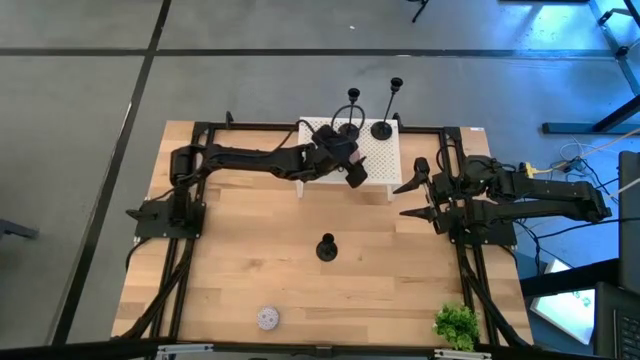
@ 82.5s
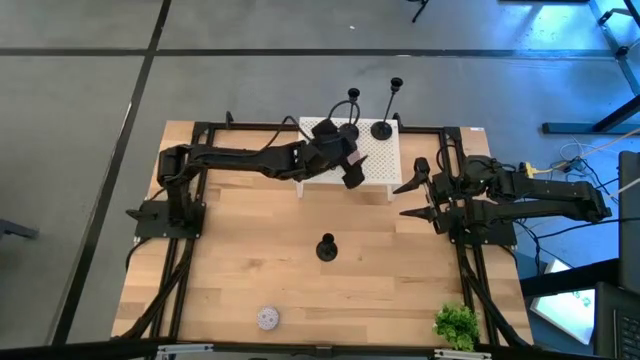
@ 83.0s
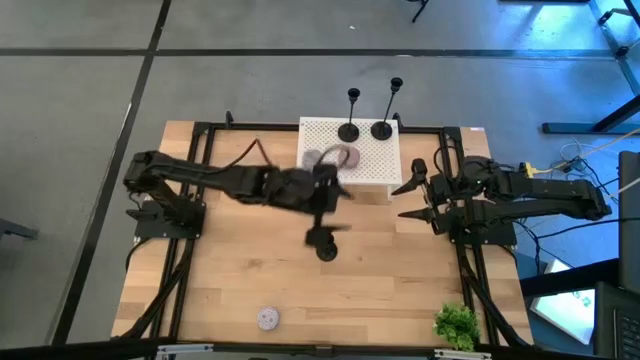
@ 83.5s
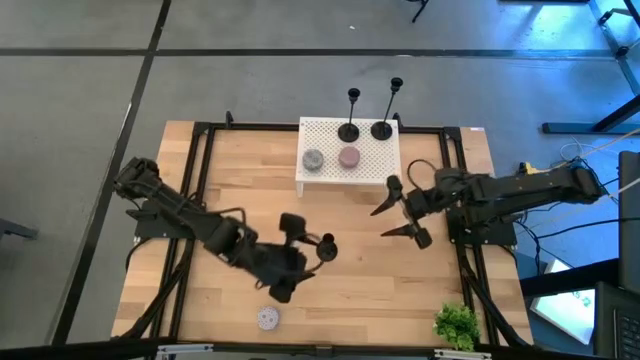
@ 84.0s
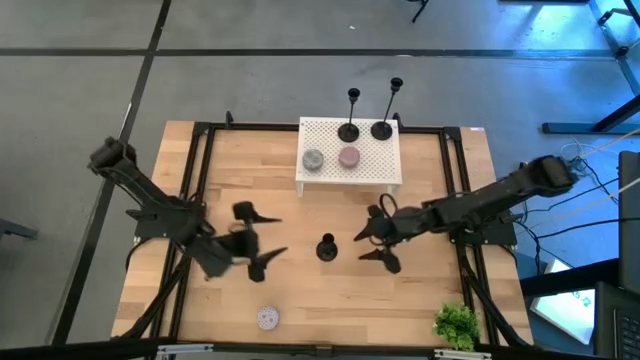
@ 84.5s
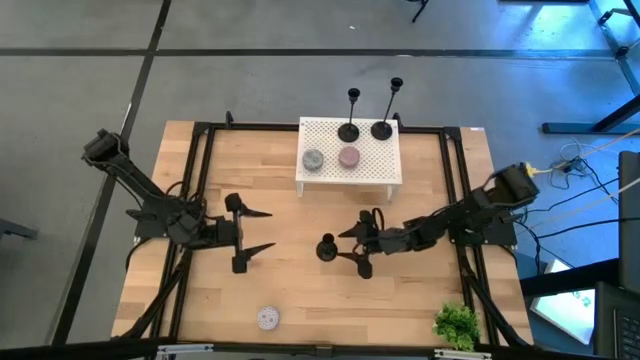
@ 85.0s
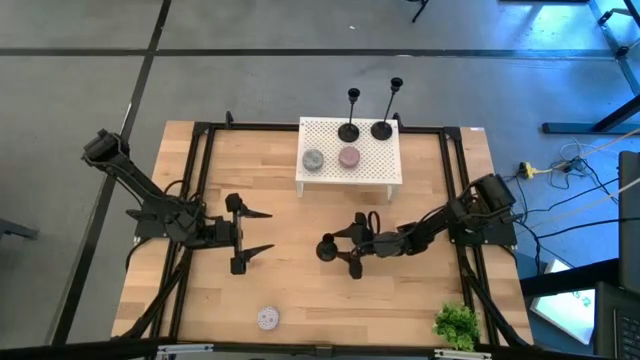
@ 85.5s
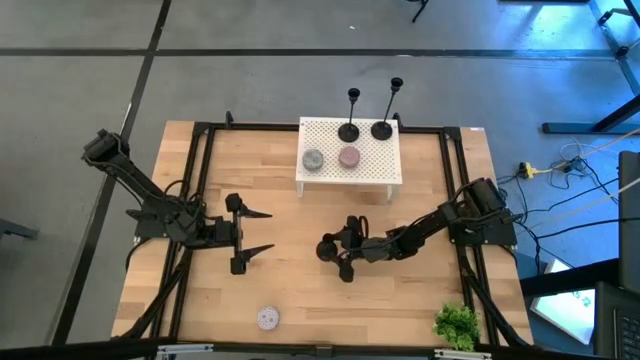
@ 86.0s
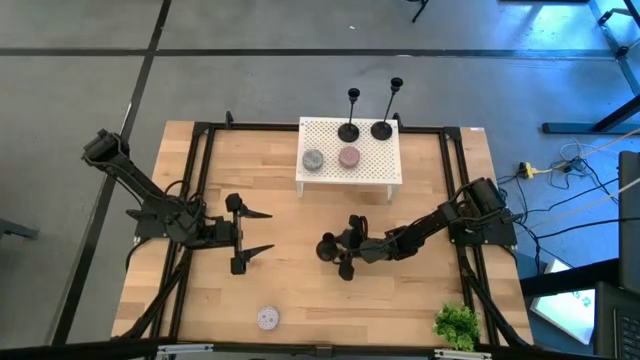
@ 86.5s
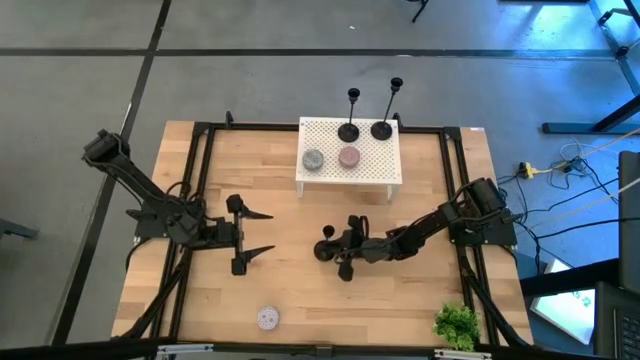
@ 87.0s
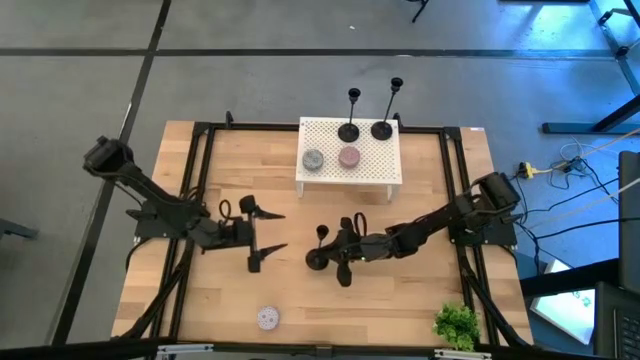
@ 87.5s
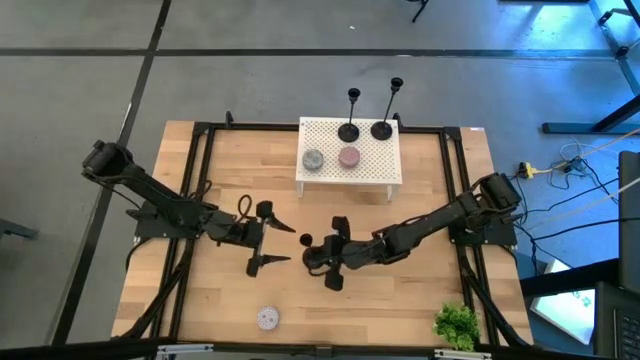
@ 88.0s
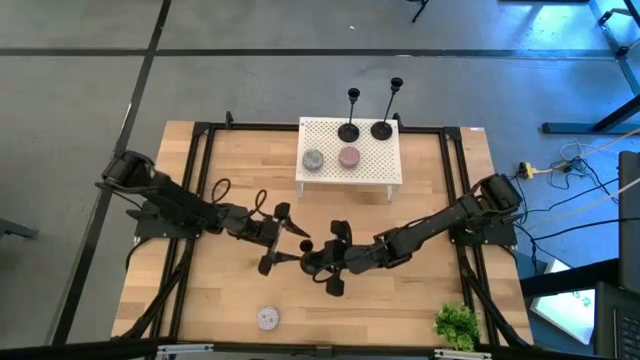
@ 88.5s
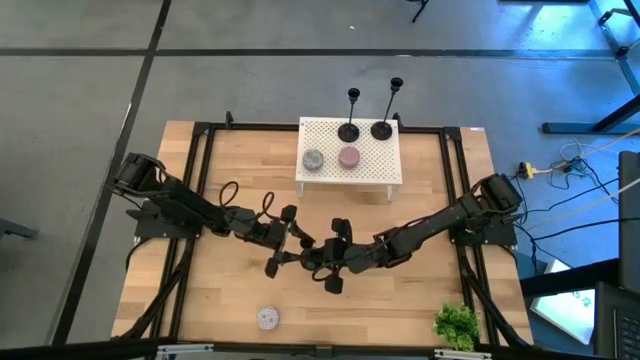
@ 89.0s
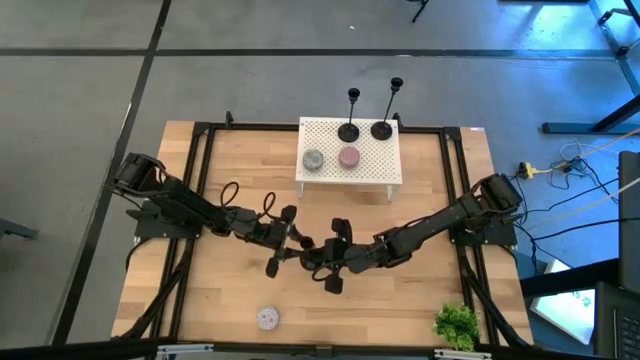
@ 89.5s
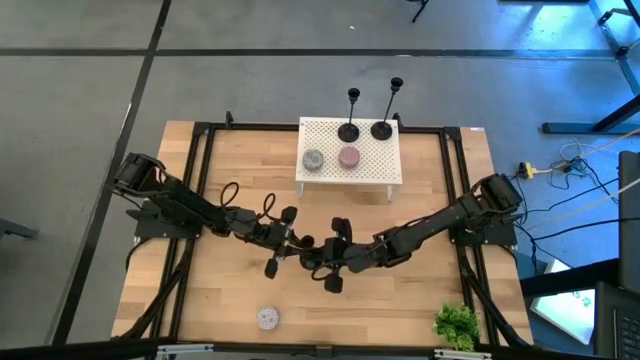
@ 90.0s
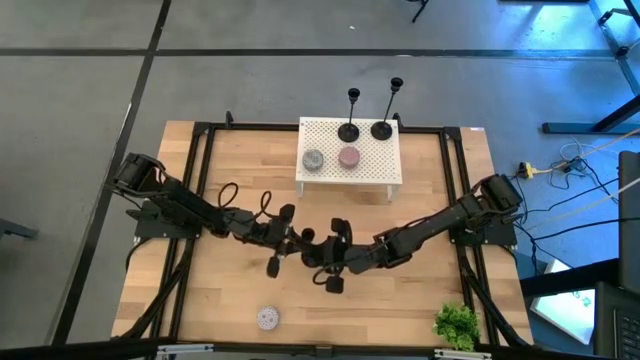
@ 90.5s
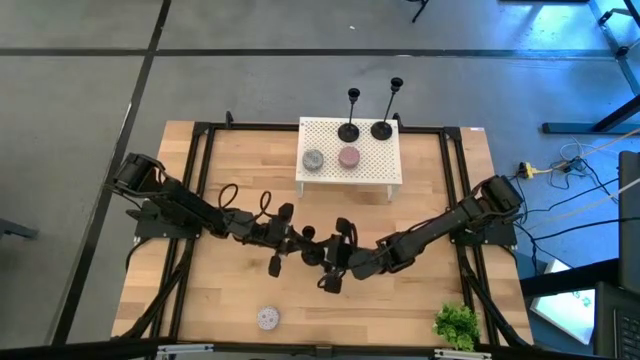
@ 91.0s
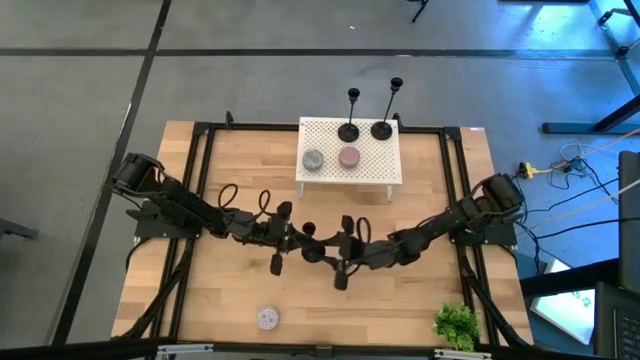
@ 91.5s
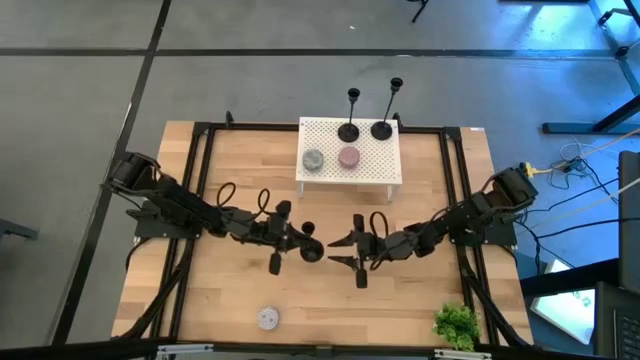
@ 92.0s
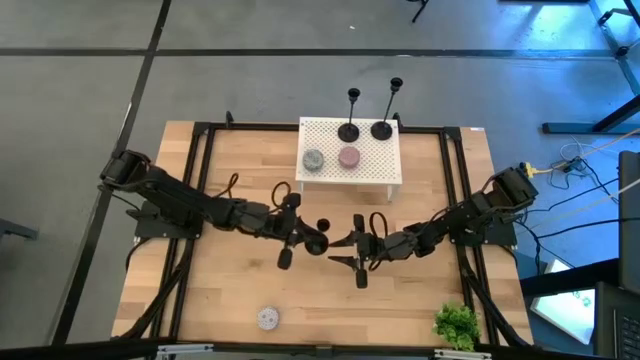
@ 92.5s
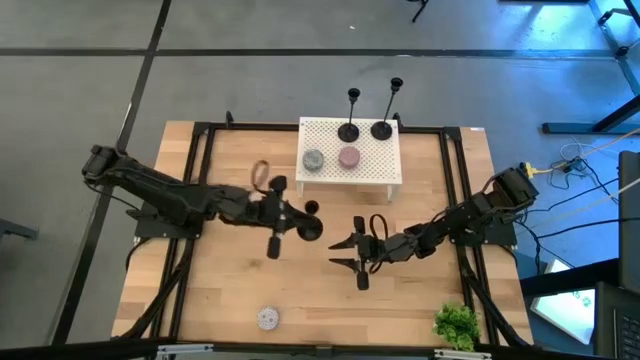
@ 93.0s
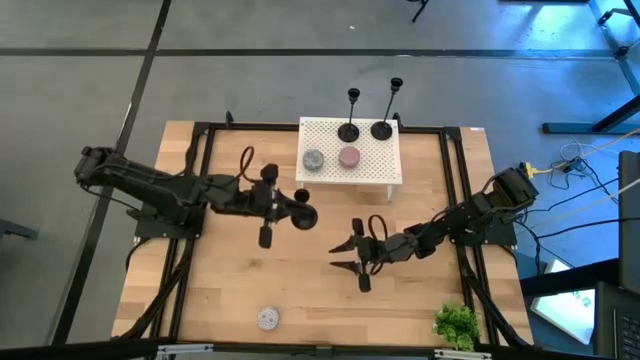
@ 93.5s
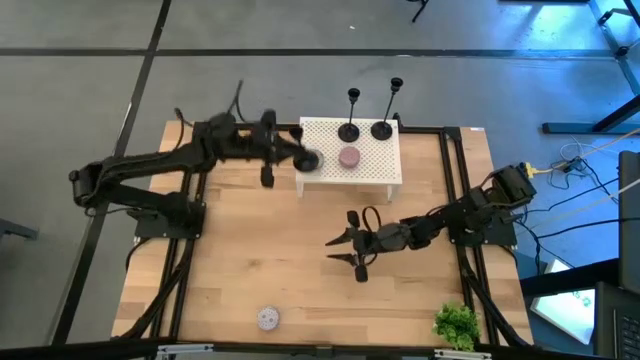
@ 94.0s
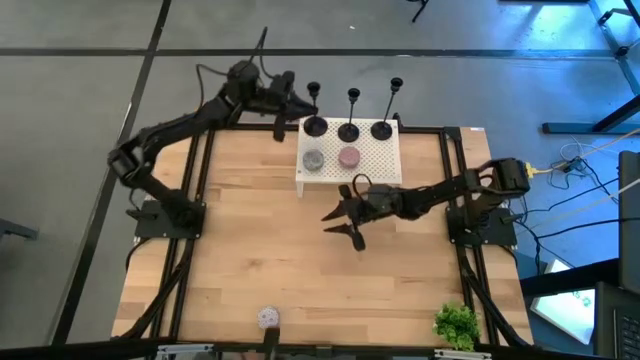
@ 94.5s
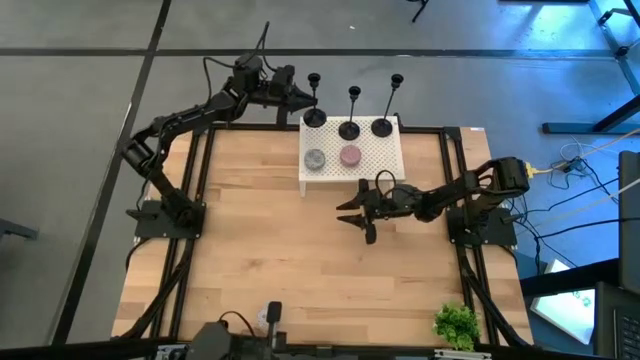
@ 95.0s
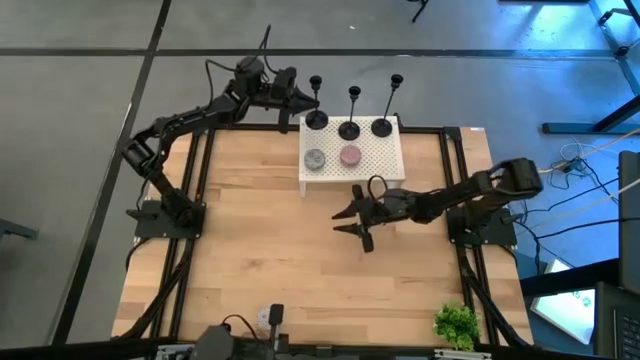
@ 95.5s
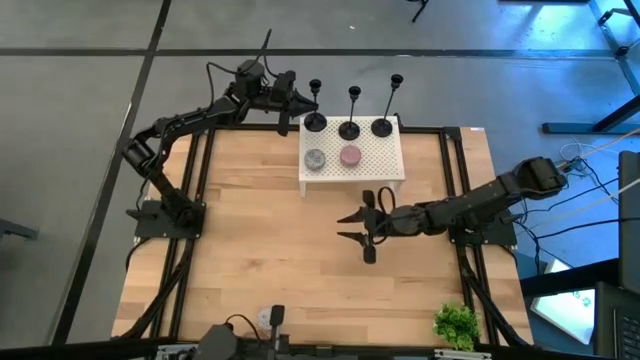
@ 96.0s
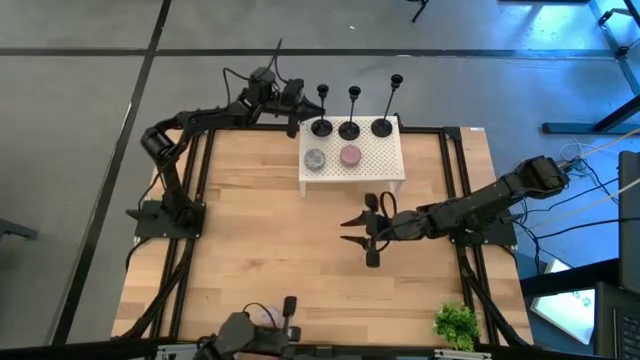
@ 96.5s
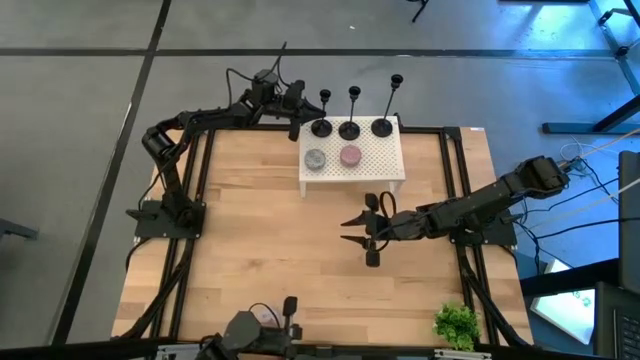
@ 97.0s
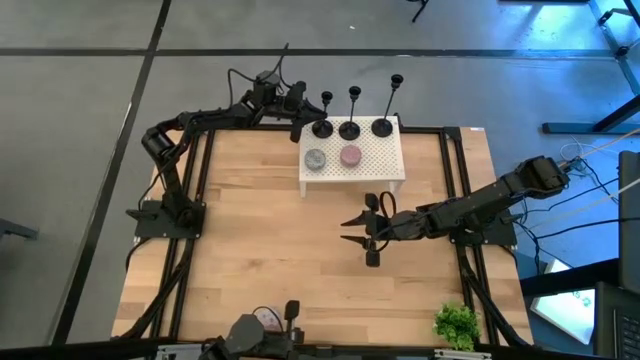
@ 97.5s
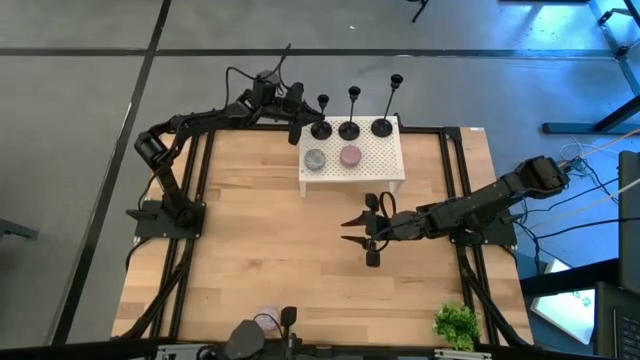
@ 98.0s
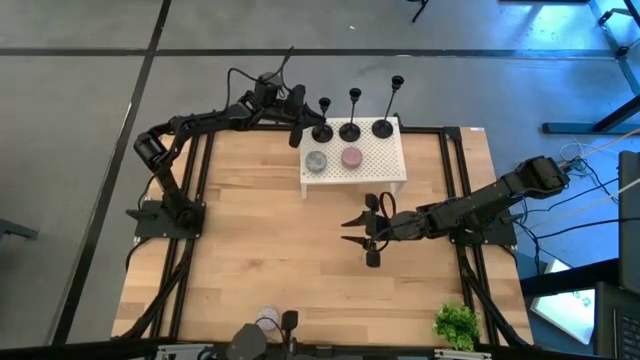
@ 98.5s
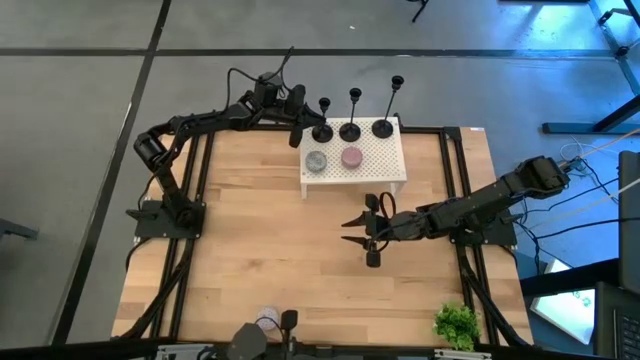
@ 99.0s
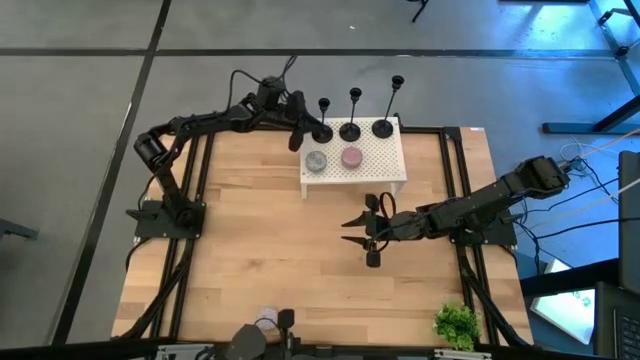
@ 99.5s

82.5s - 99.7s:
Task: Pick & Place candle stick holders
Put the candle holder on the shelf aligned with the other candle holder

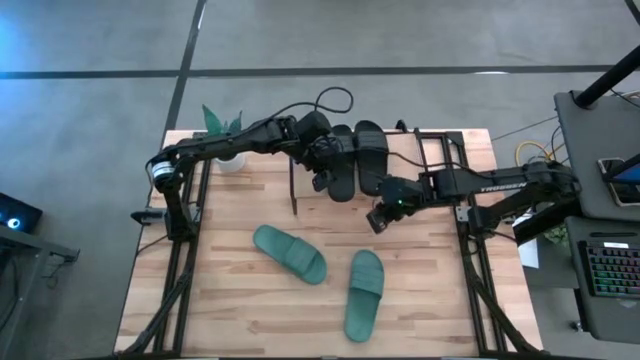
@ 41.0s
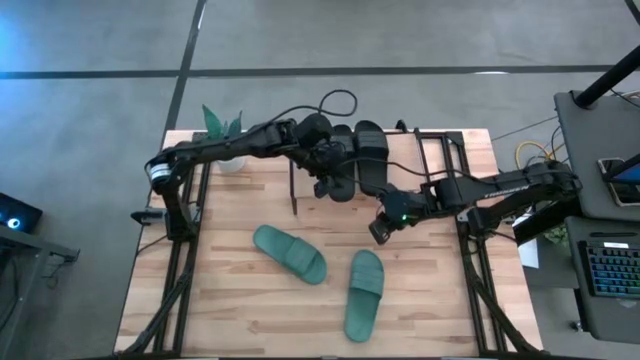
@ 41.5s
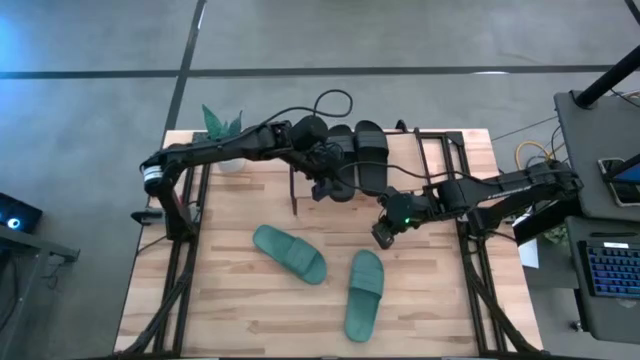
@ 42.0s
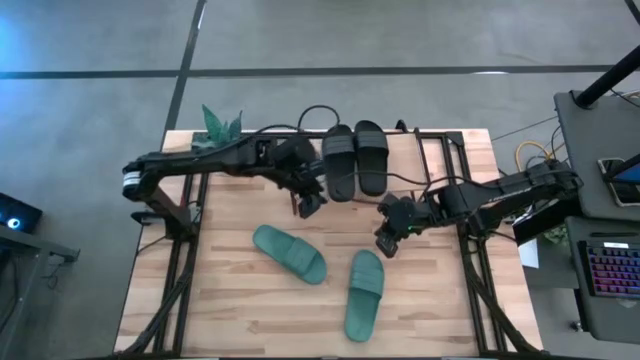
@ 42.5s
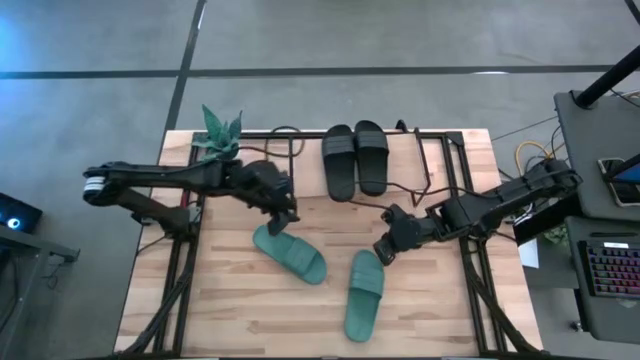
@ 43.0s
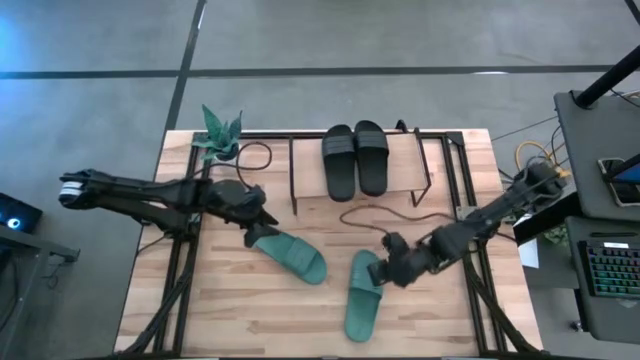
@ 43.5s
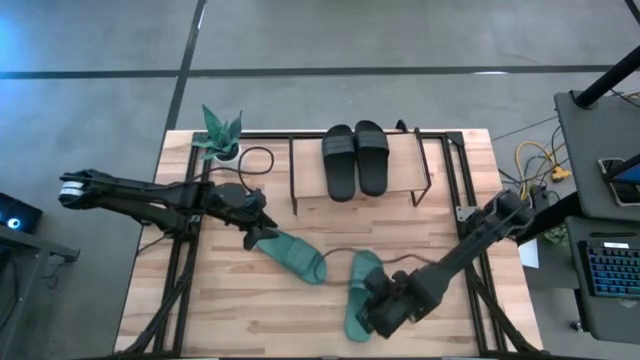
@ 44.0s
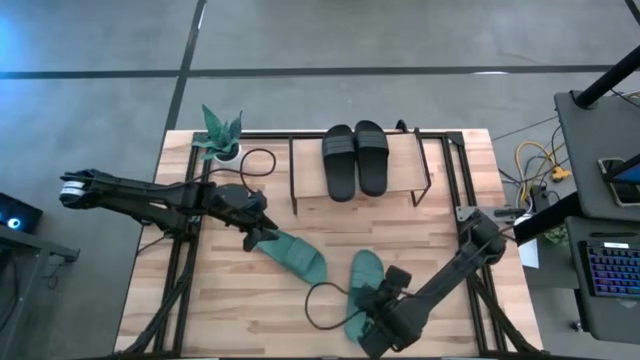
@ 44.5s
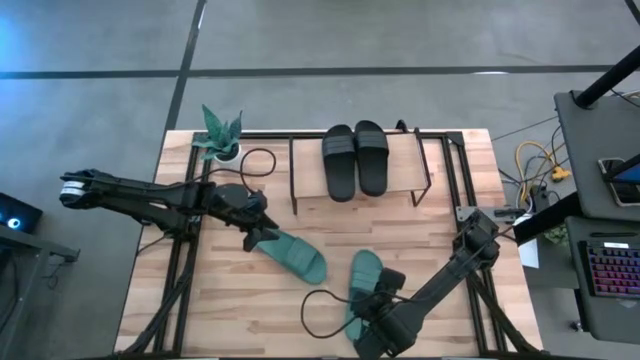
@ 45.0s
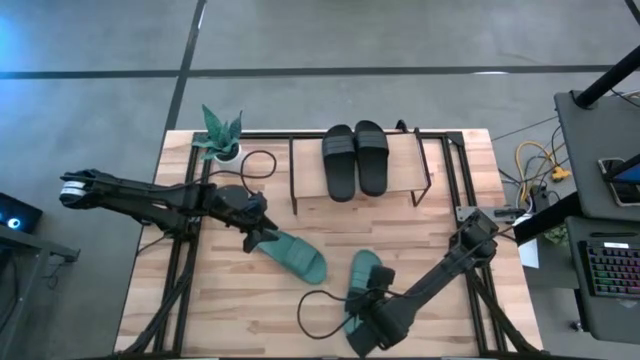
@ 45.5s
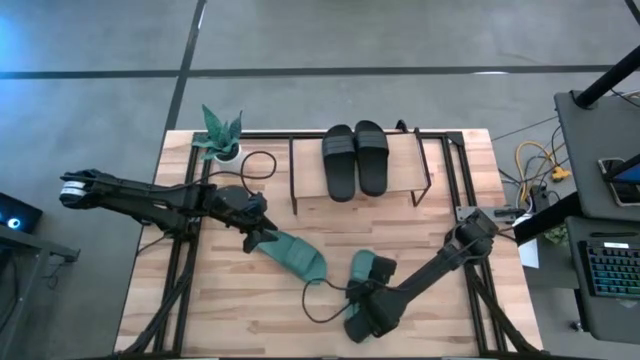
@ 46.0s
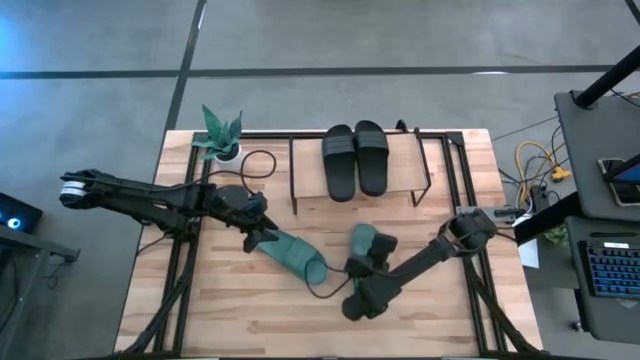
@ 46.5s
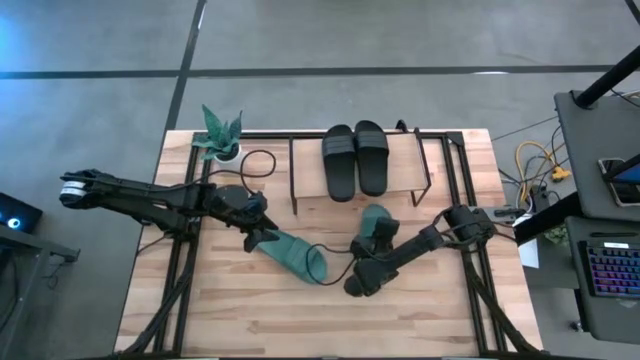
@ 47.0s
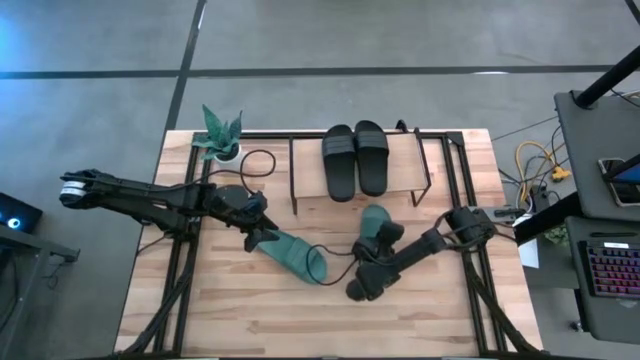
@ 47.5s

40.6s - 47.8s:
Task: Pick and place slides into the shelf
Move the right green slide to the center of the table
